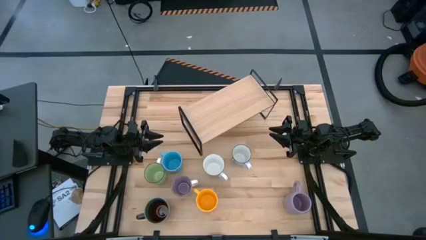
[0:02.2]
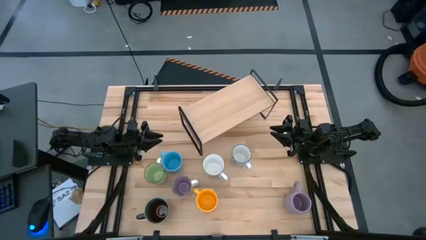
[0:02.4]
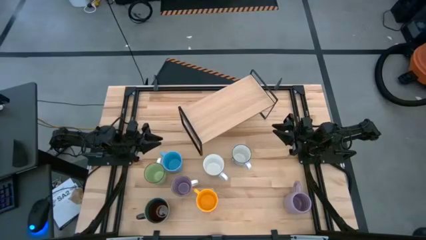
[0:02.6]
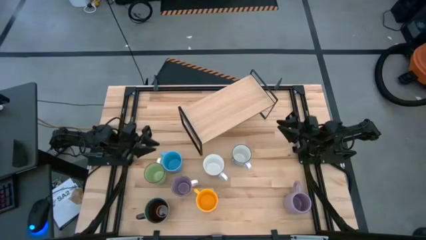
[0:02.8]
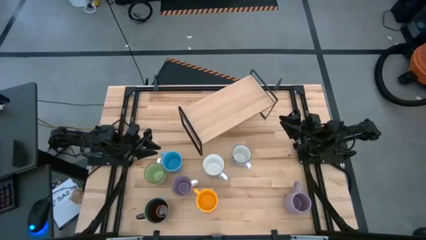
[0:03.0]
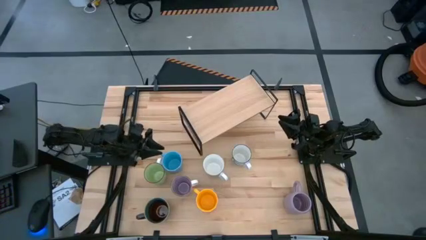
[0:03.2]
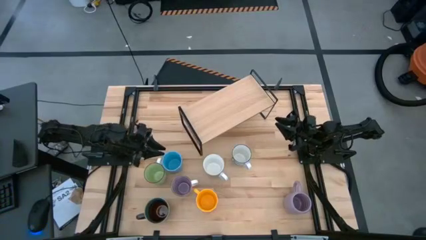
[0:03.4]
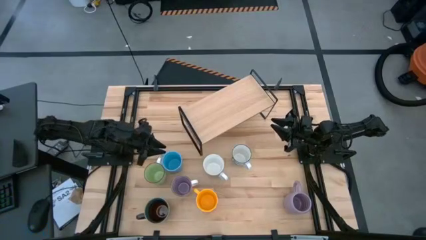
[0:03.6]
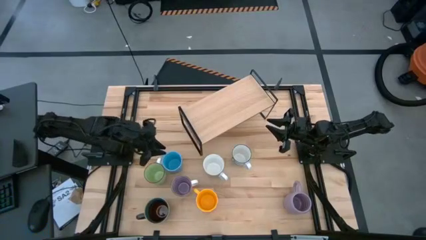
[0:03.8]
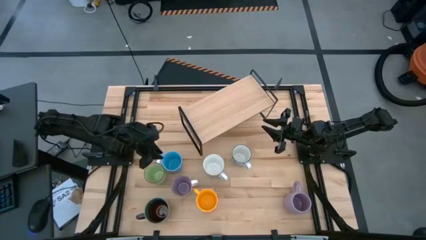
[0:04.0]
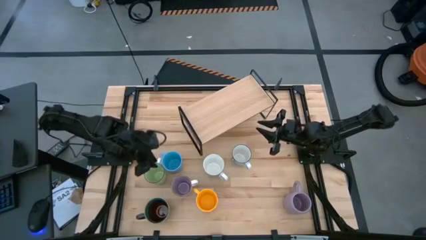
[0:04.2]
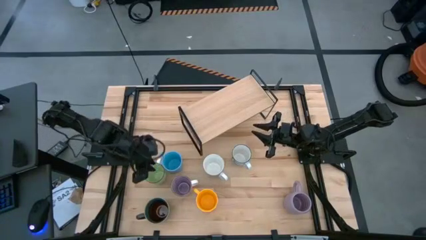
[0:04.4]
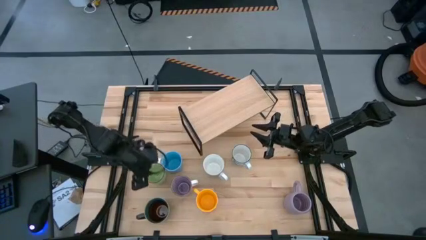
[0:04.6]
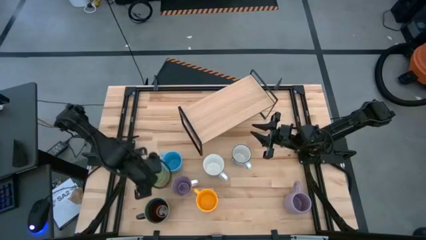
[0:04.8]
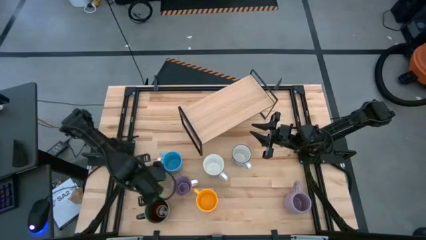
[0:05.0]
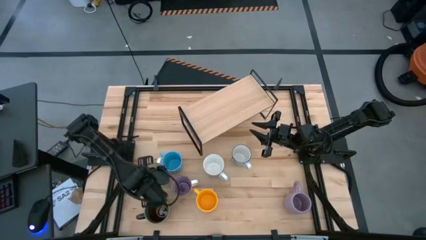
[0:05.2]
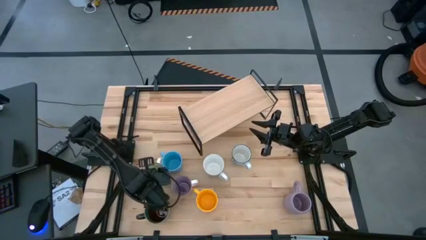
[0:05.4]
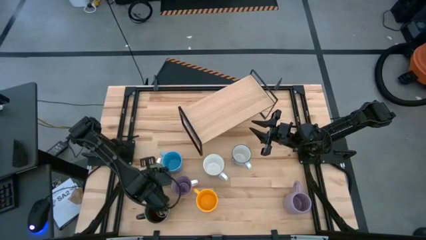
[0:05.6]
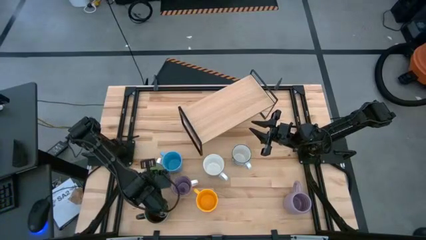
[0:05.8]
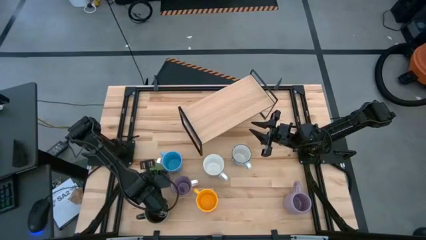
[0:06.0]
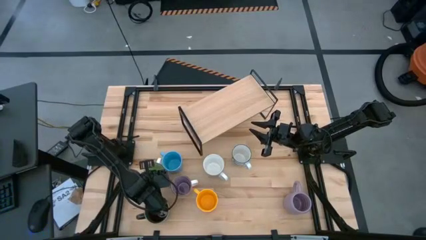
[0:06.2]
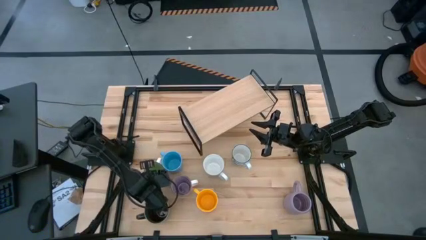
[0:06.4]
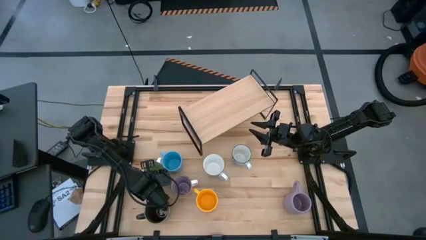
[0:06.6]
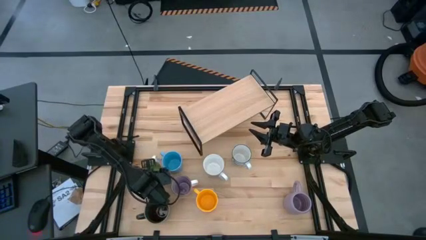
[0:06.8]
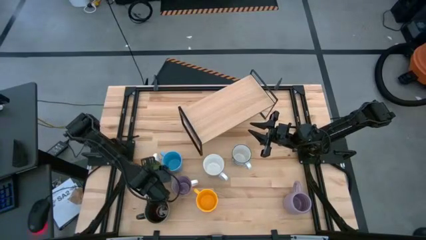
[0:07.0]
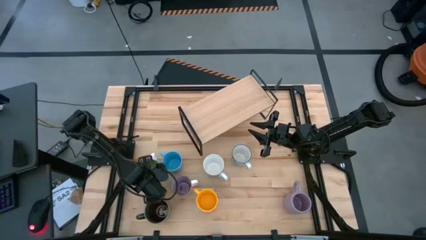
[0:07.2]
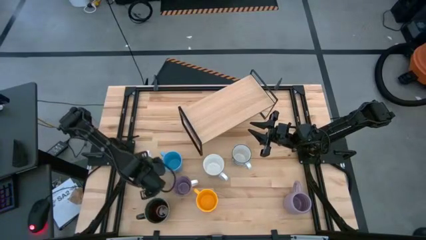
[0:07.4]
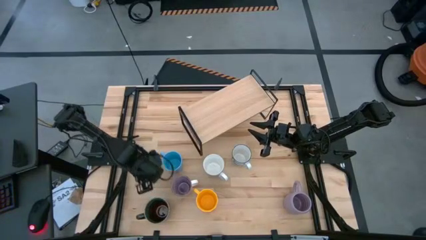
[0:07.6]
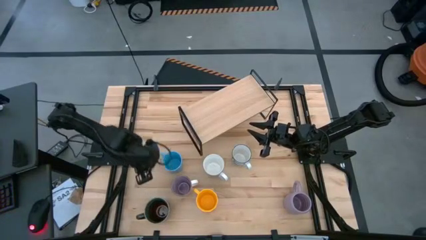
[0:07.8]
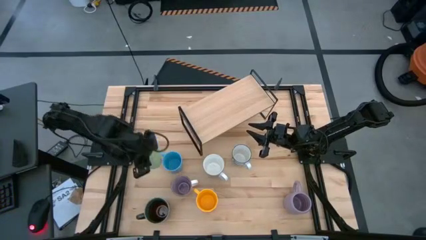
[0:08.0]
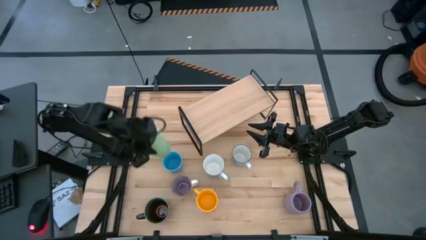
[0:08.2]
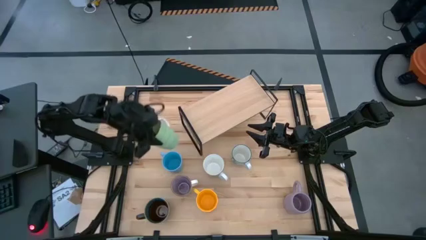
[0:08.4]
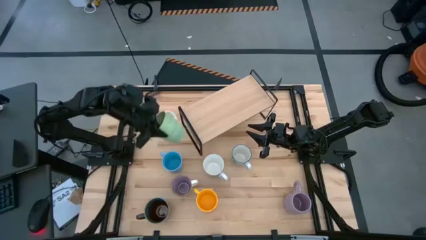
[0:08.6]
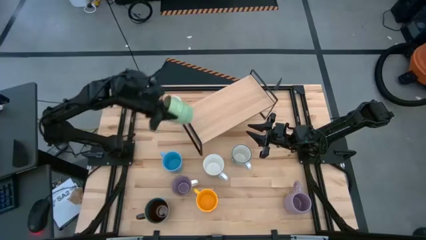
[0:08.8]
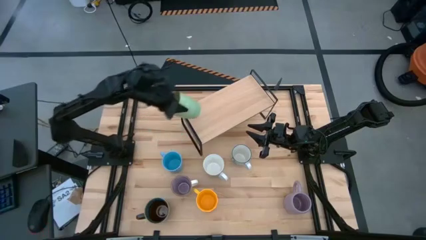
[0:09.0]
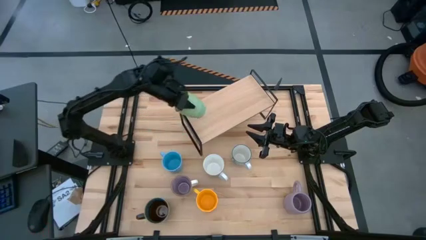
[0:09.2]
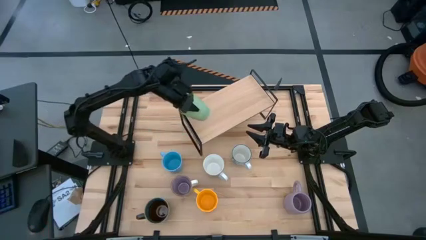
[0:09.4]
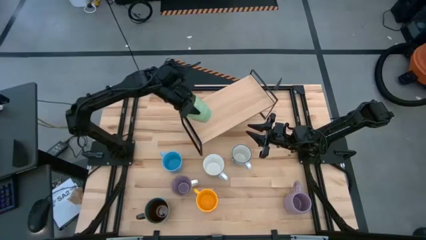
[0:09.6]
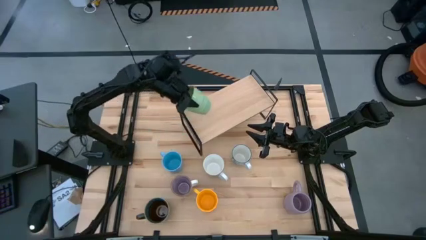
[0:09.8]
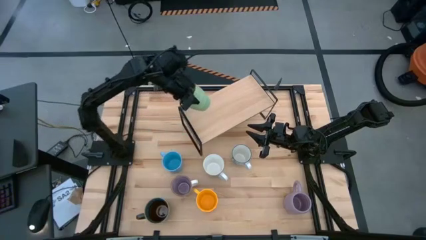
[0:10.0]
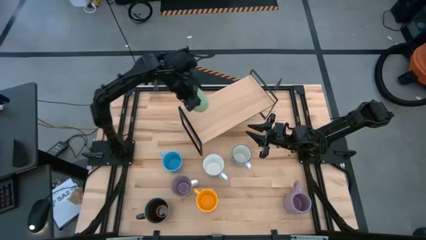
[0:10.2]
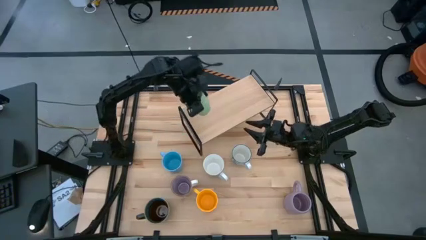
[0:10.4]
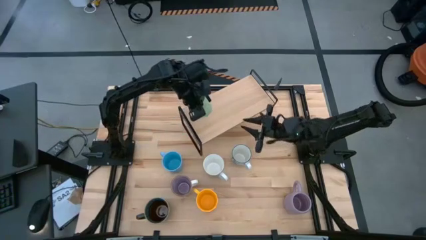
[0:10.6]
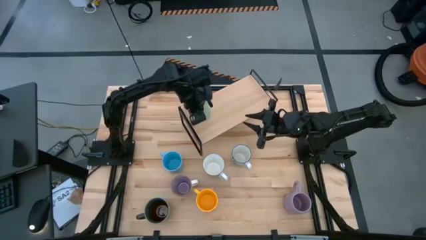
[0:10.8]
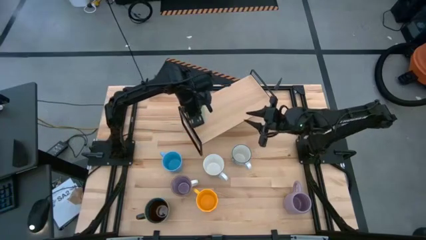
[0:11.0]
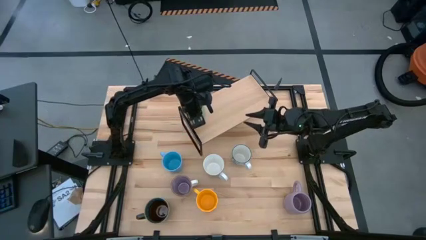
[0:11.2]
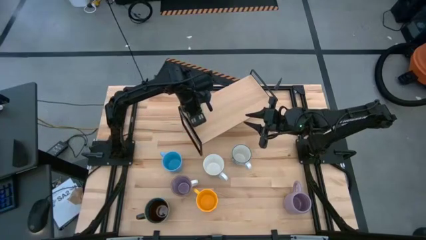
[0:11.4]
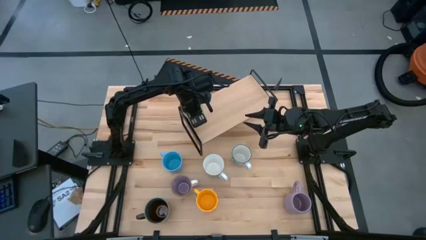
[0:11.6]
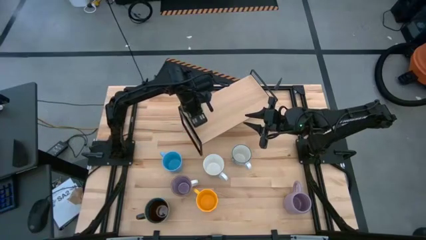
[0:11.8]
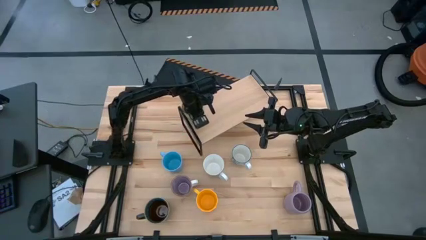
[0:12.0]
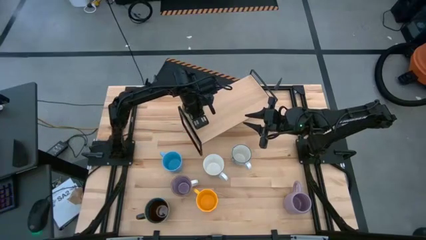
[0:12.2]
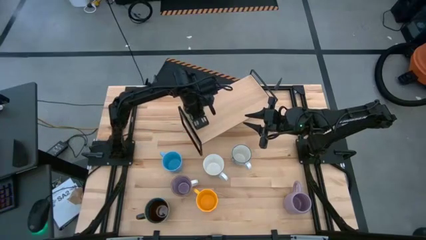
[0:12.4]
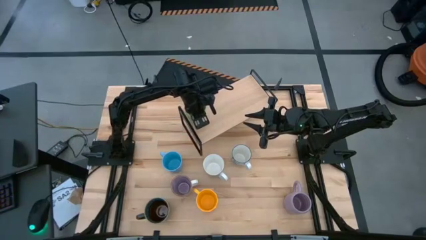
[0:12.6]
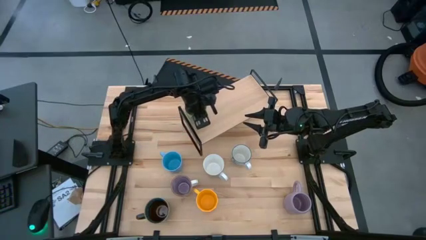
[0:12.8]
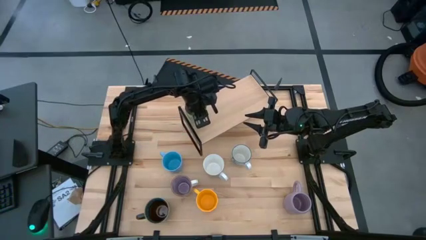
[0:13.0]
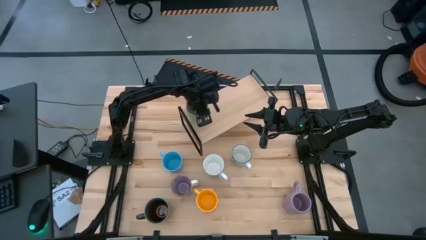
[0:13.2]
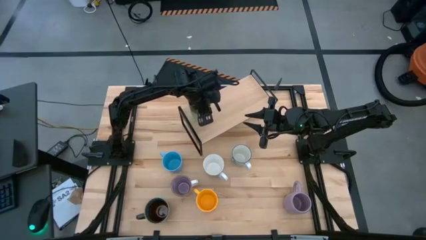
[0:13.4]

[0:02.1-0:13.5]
Task: Place coffee mugs
Put the green mug on the shelf
